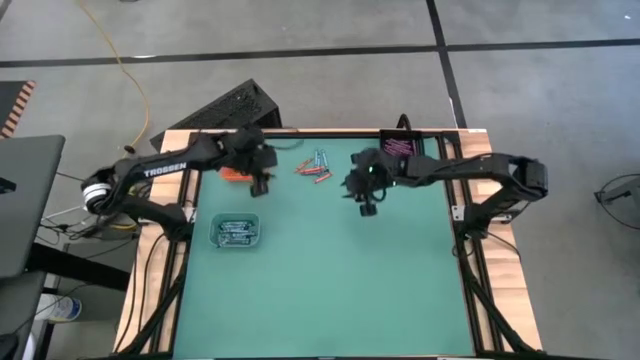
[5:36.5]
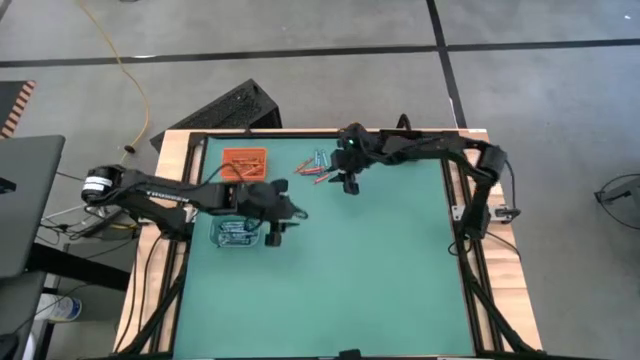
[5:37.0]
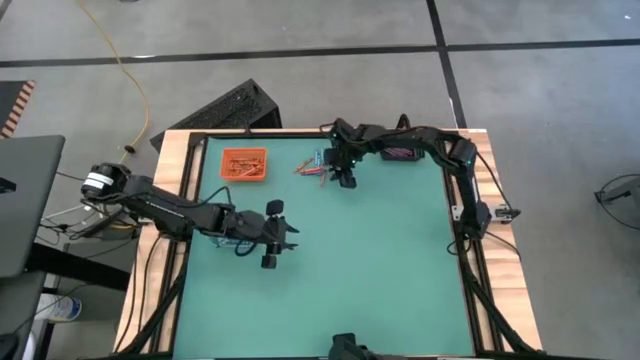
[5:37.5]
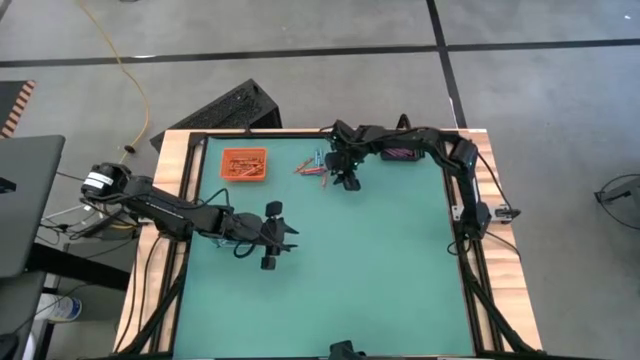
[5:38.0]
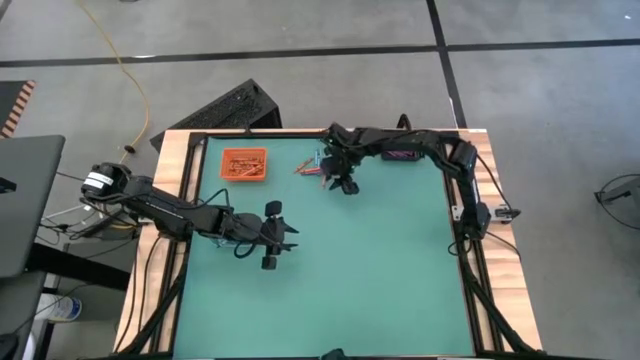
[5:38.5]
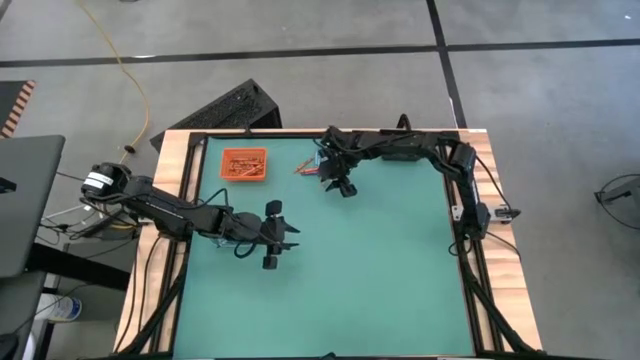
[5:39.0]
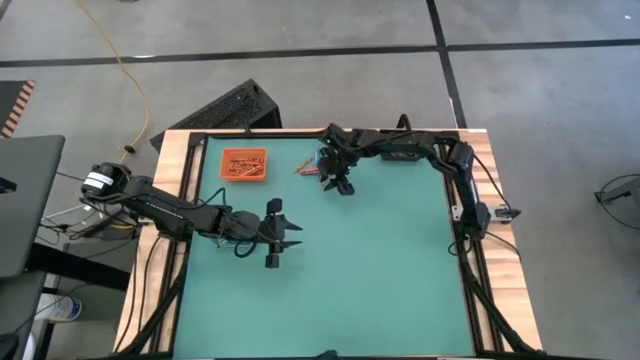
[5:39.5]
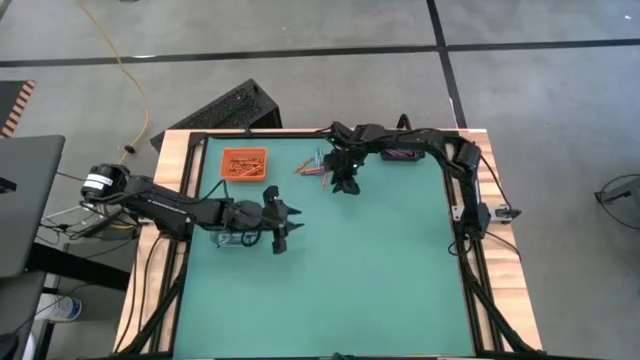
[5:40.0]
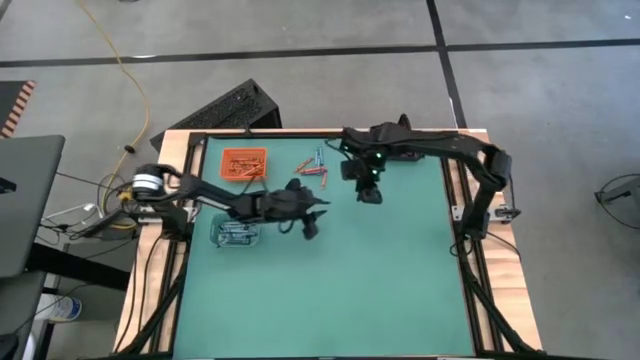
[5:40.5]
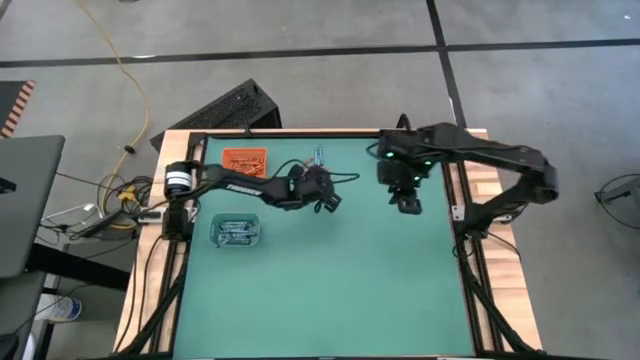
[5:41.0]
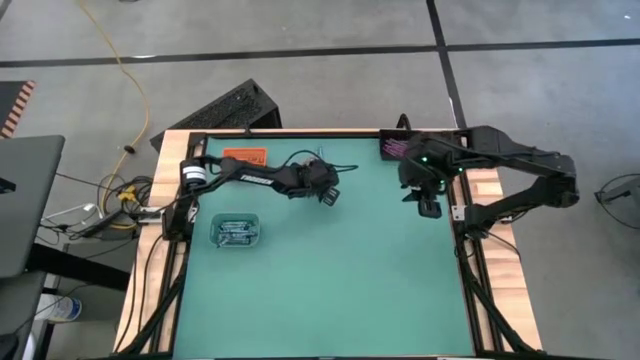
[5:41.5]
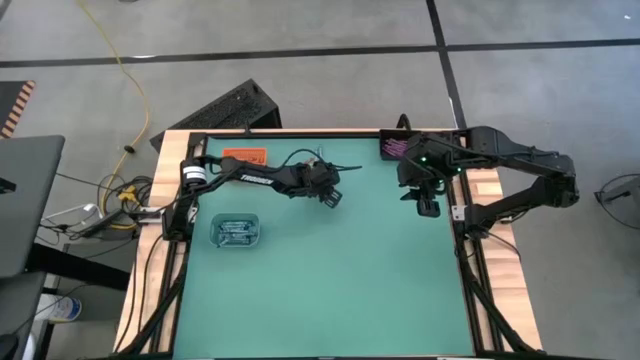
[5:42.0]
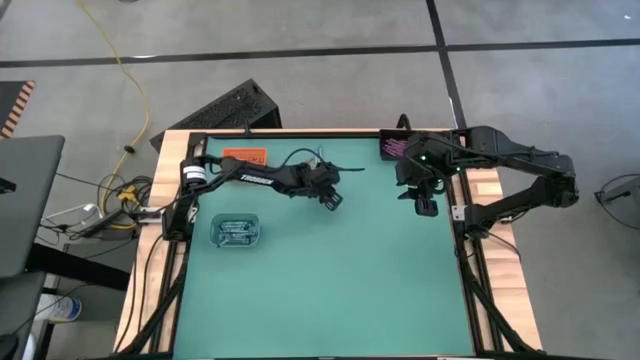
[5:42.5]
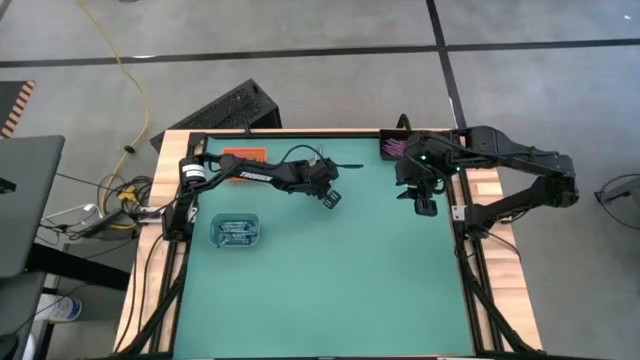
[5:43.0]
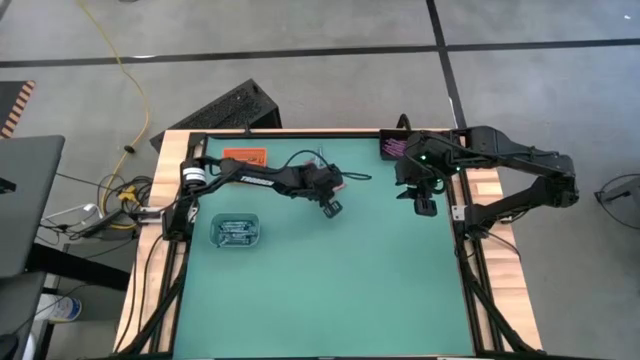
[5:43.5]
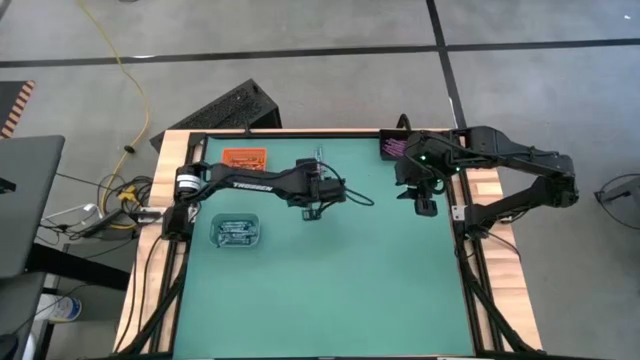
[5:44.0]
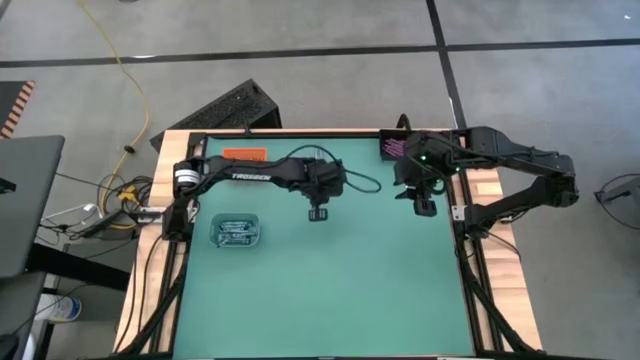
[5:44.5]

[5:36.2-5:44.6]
Task: Sort crayons
Put the orange crayon into the orange basket

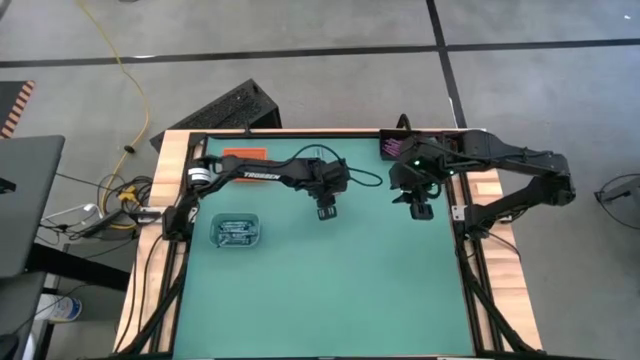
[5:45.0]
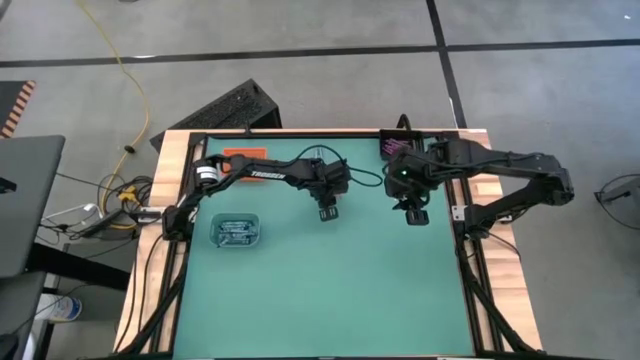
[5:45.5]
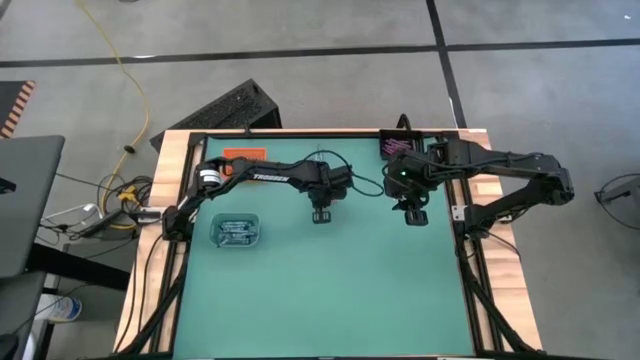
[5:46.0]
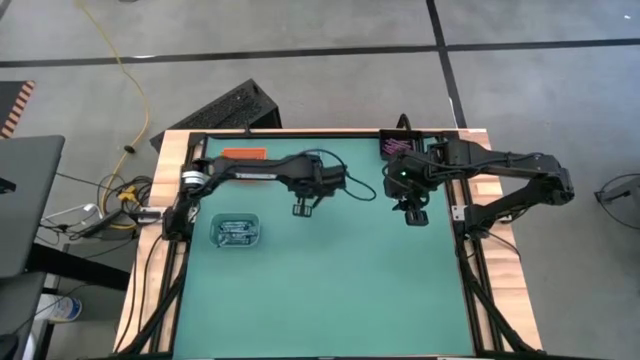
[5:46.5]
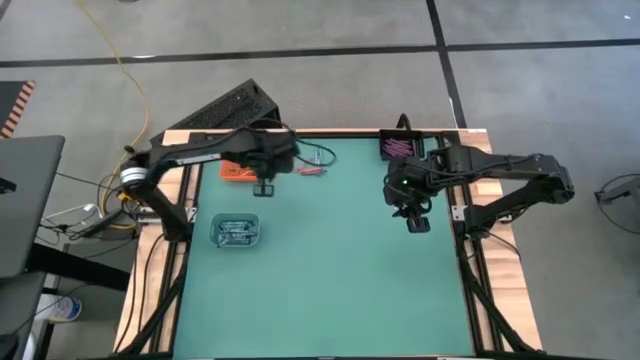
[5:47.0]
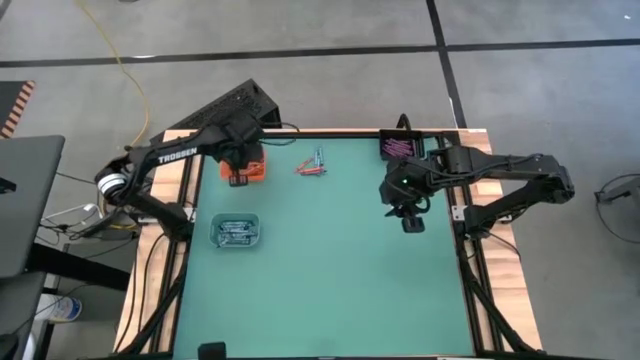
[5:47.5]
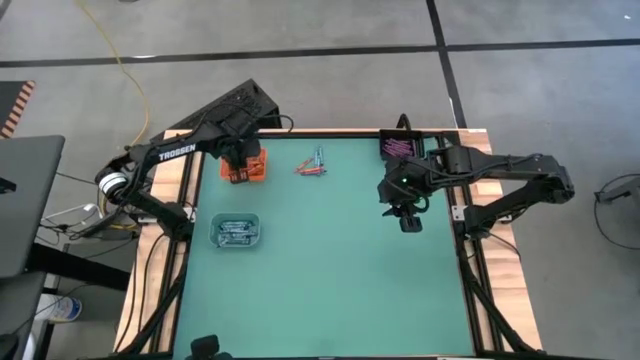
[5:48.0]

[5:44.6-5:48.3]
Put the orange crayon into the orange basket

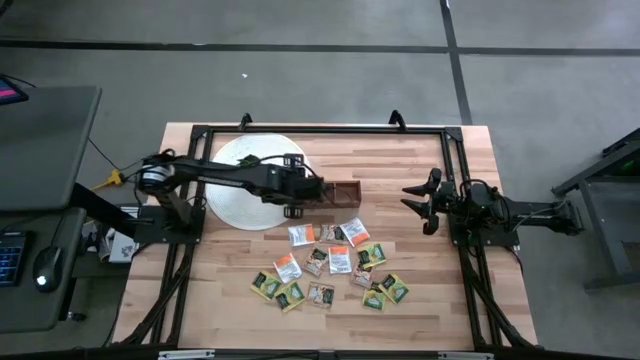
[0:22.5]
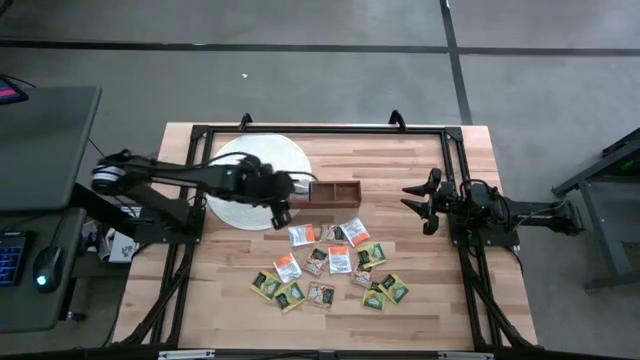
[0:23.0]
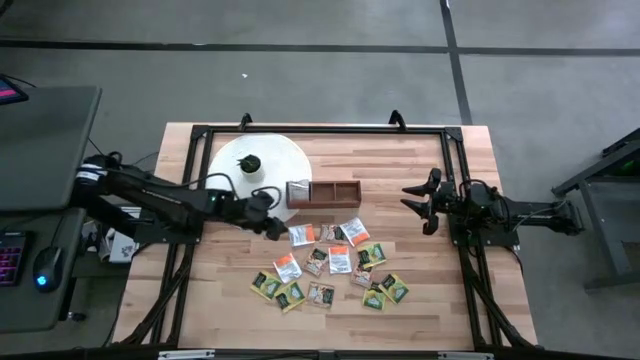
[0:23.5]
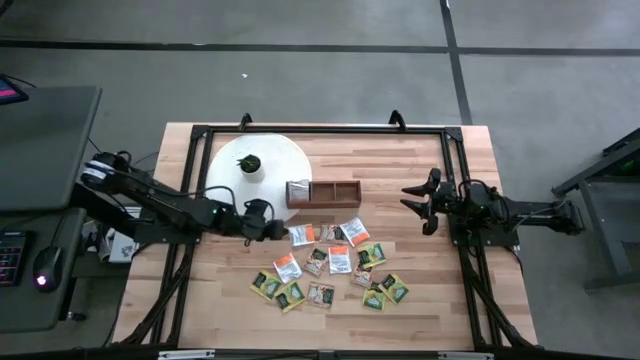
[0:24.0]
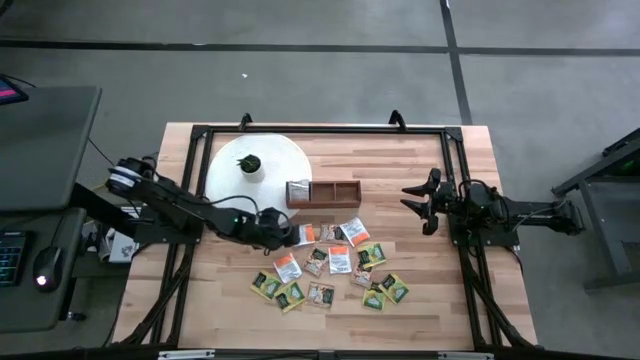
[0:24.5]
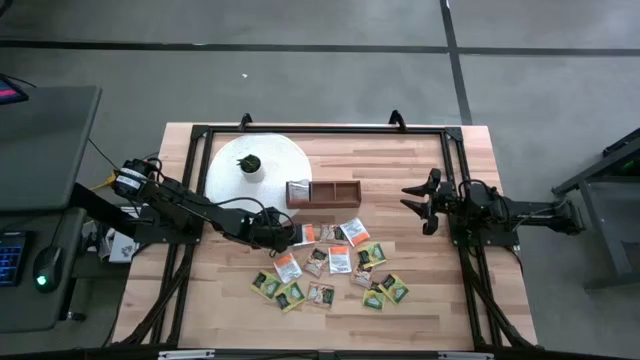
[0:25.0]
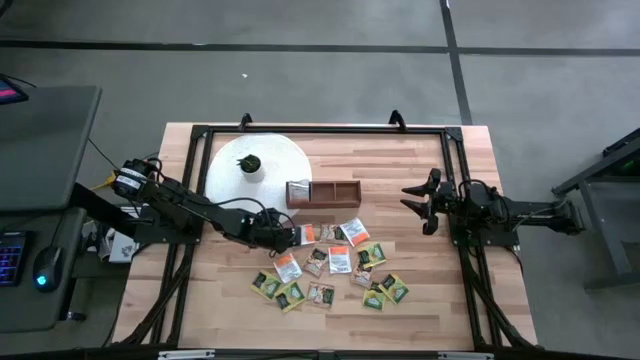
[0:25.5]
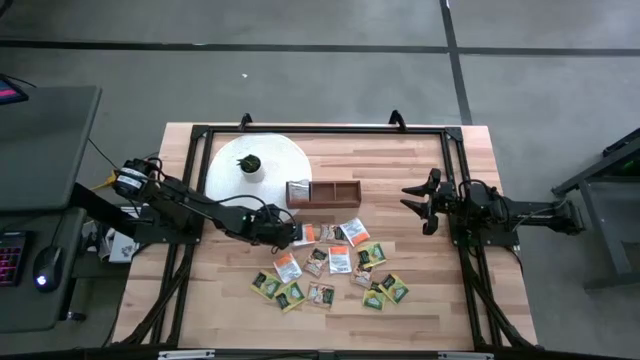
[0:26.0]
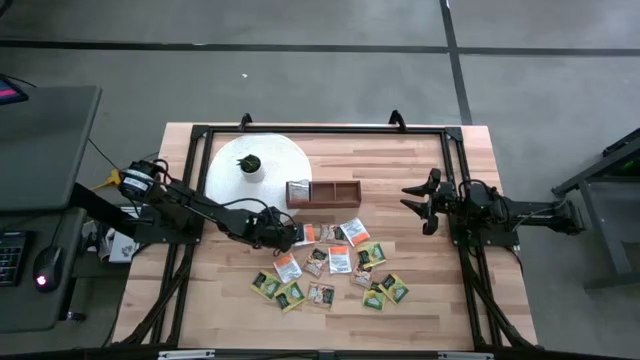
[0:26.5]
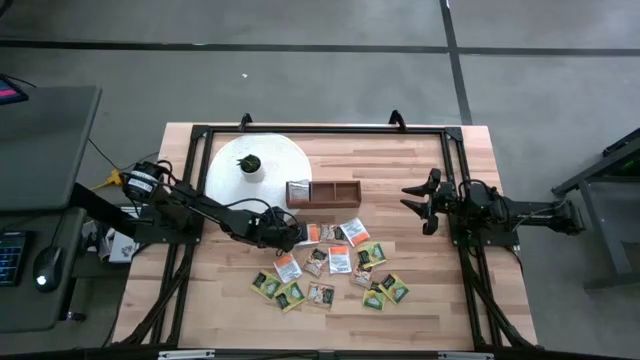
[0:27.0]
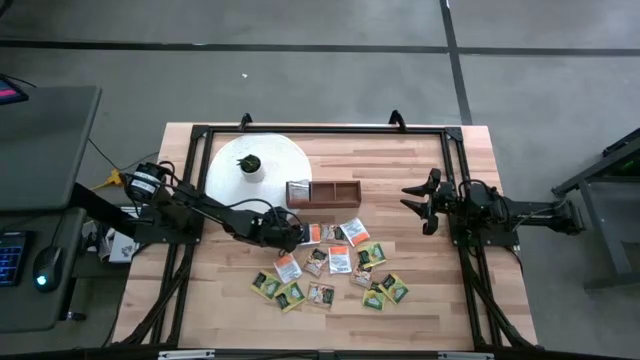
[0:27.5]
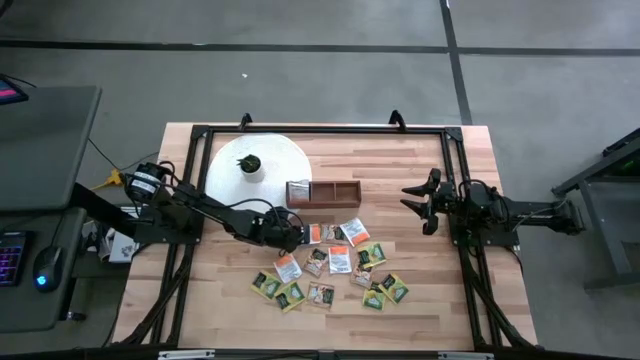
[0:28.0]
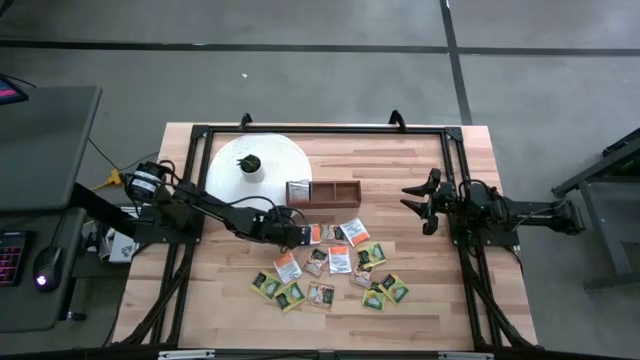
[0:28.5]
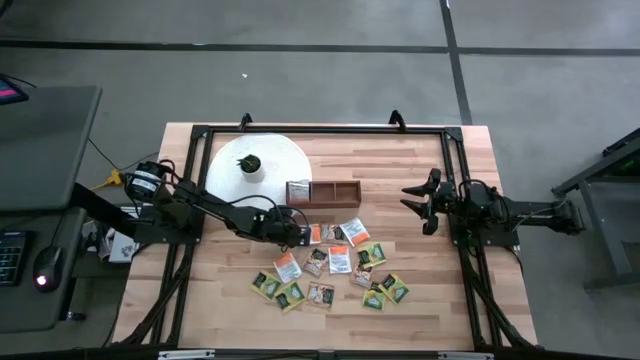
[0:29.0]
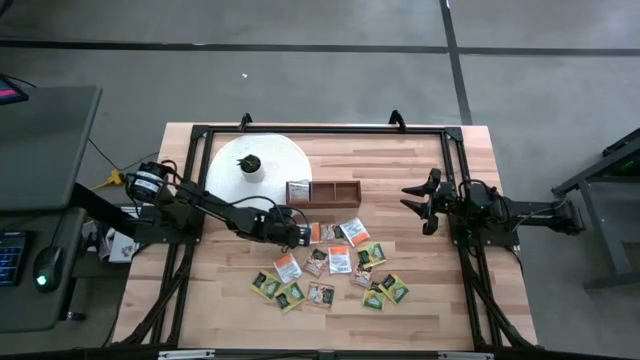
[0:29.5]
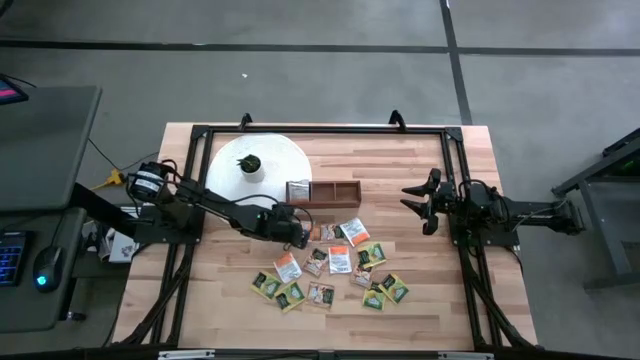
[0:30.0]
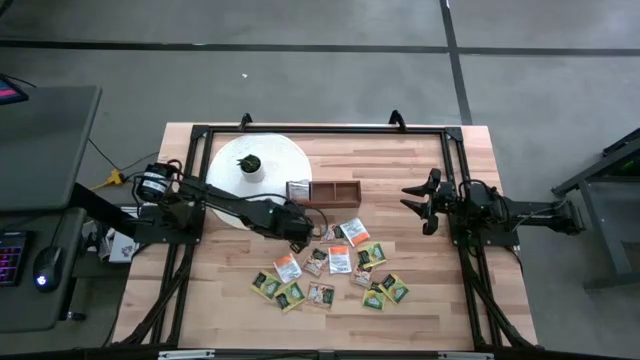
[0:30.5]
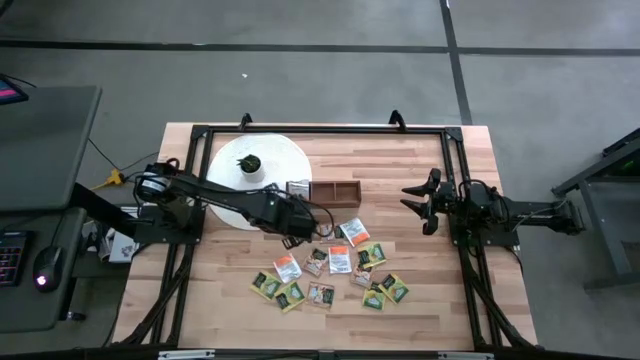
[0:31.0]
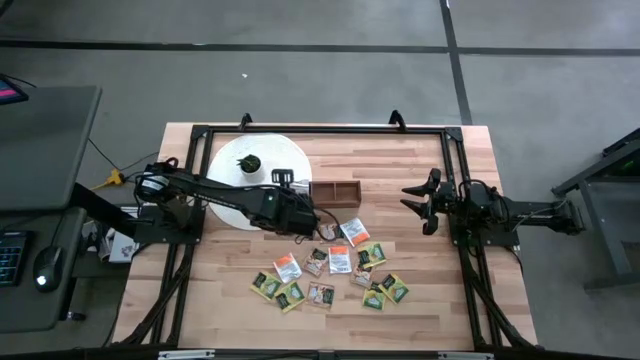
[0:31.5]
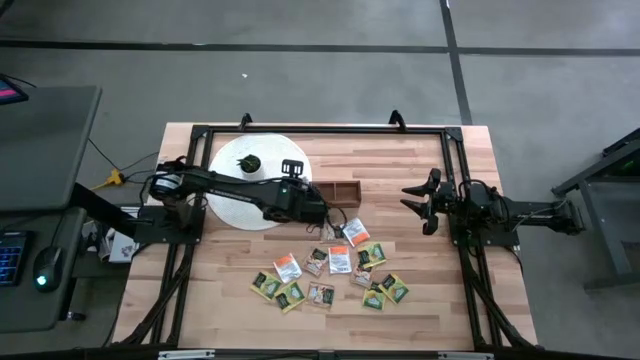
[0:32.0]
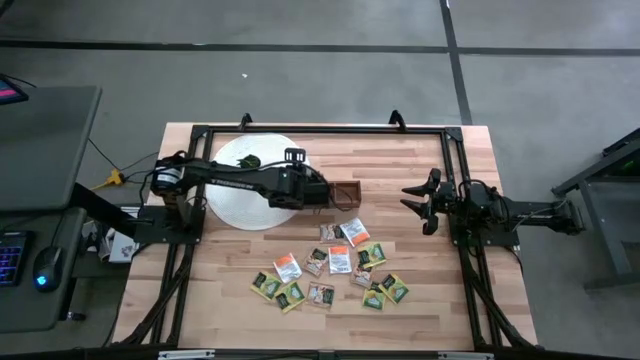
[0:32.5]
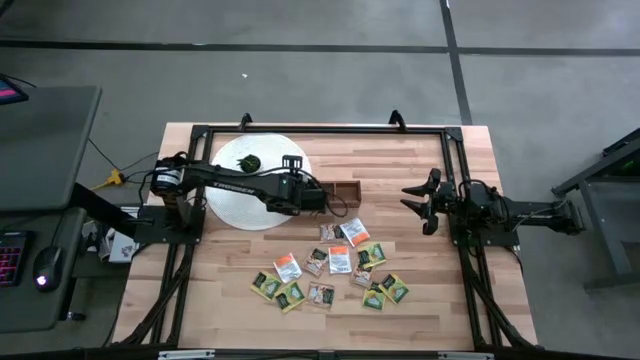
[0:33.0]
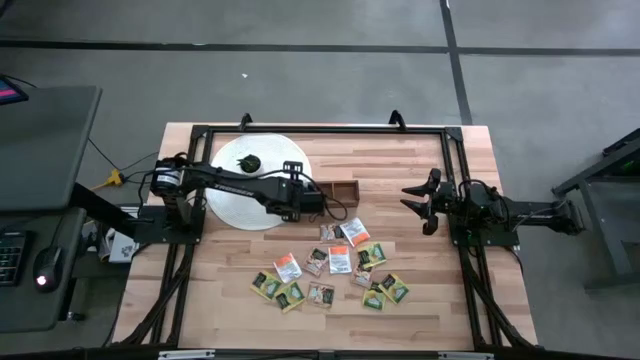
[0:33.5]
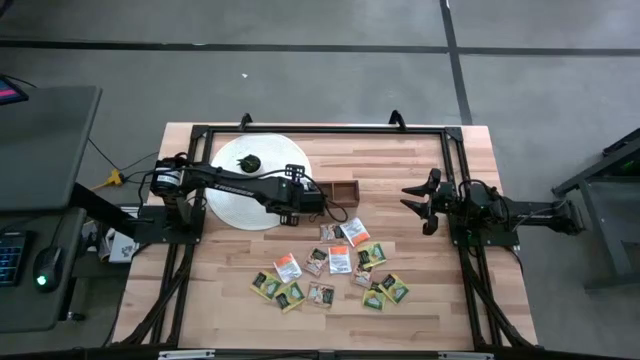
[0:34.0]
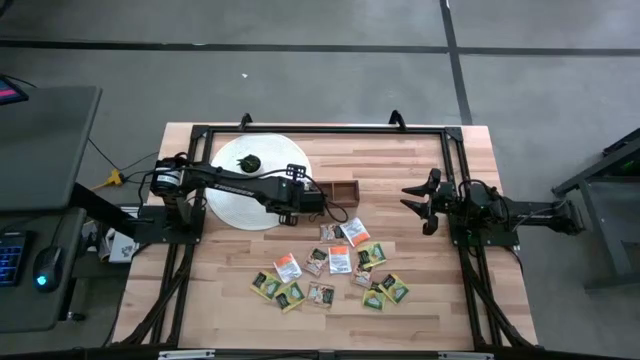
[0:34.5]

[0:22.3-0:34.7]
Task: Pick & Place Tea
Put the white tea bag into the left section of the wooden organizer
